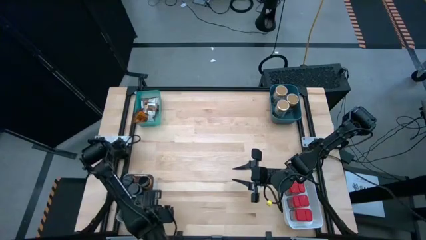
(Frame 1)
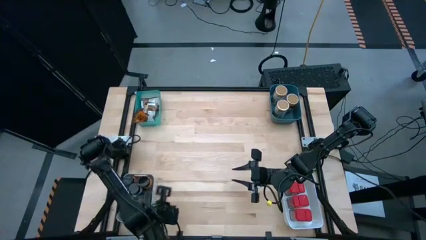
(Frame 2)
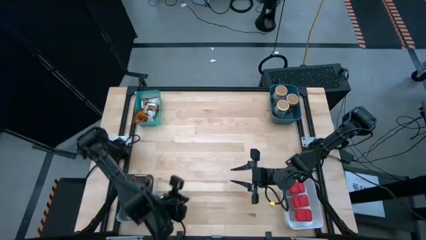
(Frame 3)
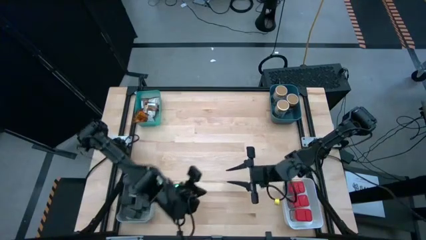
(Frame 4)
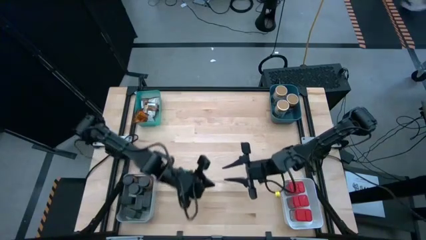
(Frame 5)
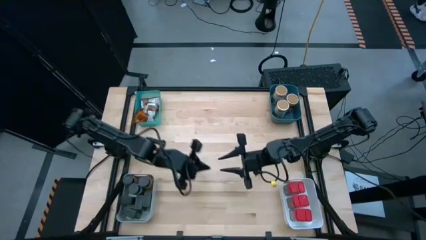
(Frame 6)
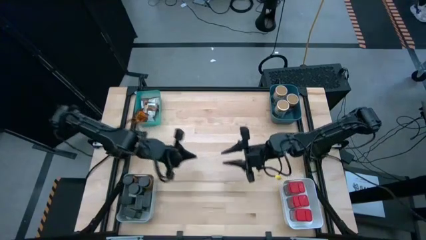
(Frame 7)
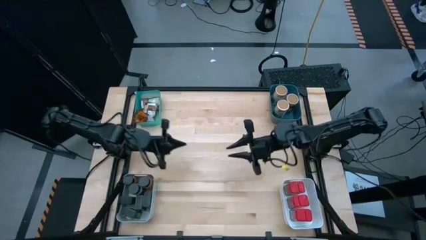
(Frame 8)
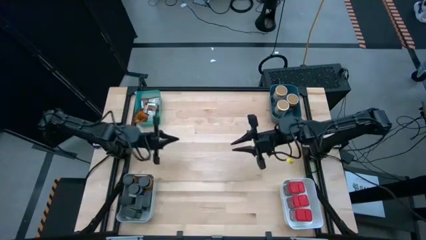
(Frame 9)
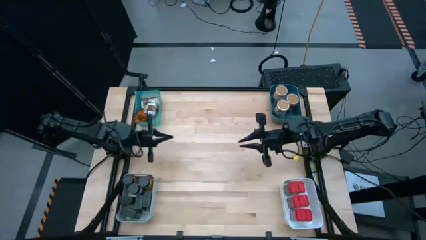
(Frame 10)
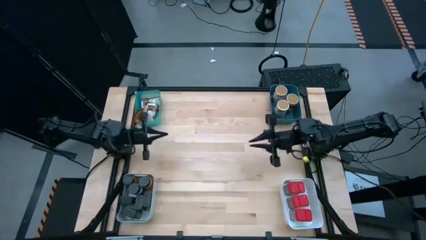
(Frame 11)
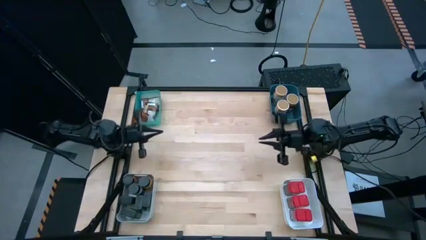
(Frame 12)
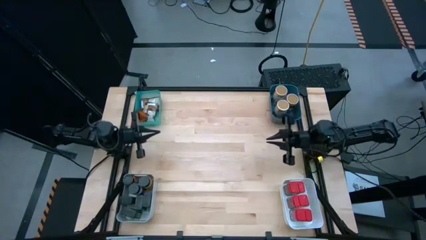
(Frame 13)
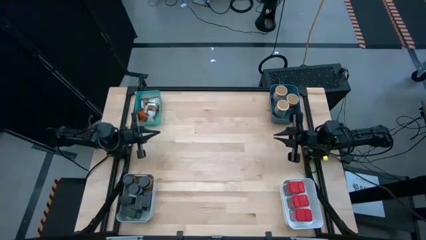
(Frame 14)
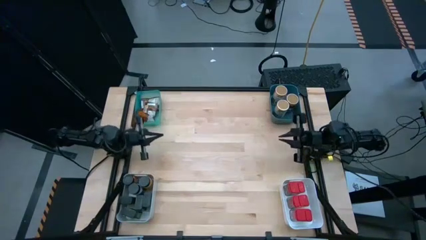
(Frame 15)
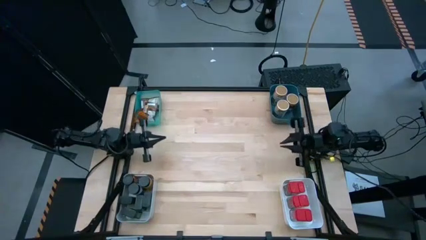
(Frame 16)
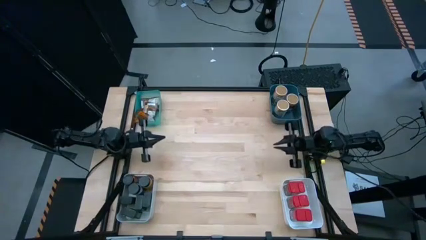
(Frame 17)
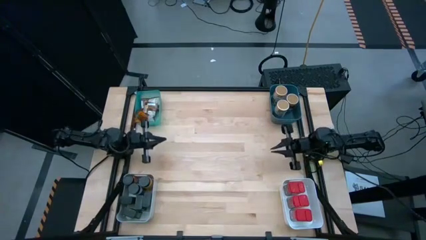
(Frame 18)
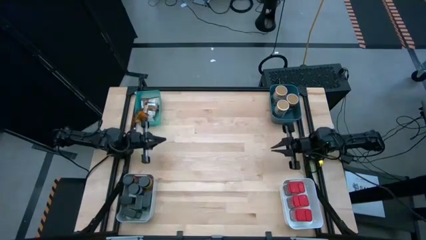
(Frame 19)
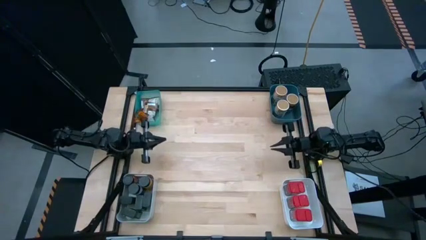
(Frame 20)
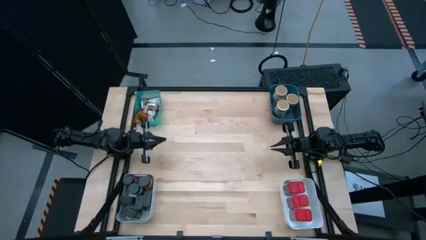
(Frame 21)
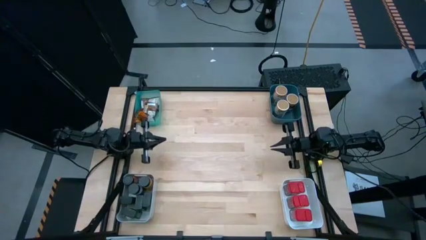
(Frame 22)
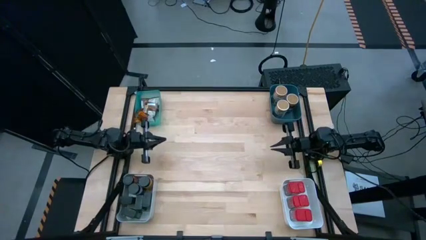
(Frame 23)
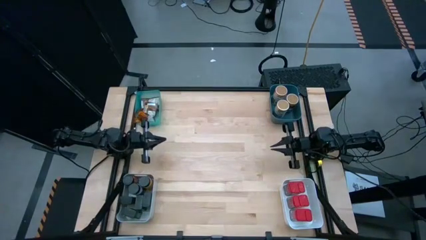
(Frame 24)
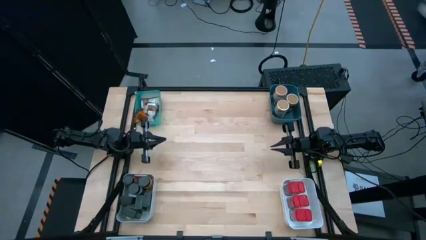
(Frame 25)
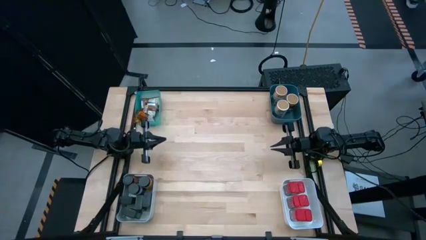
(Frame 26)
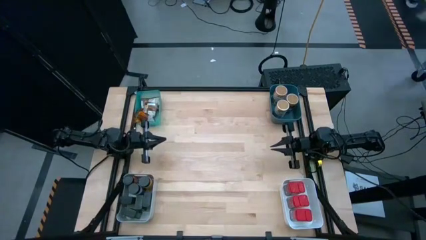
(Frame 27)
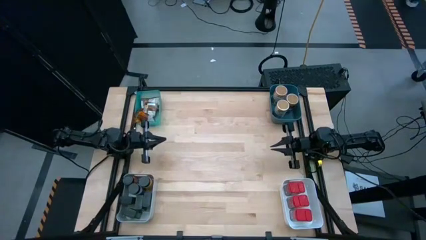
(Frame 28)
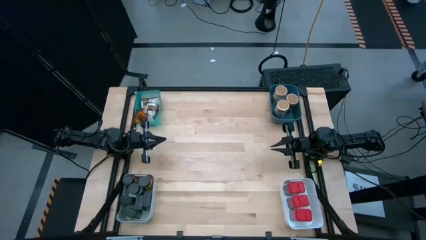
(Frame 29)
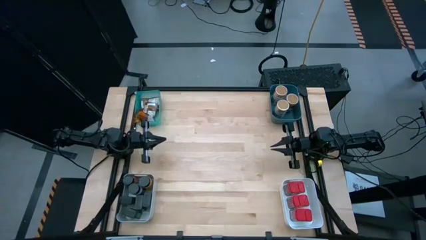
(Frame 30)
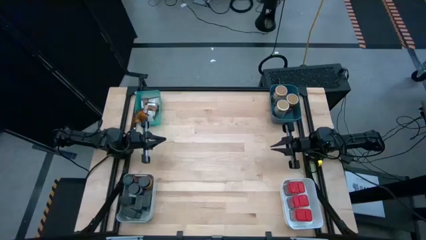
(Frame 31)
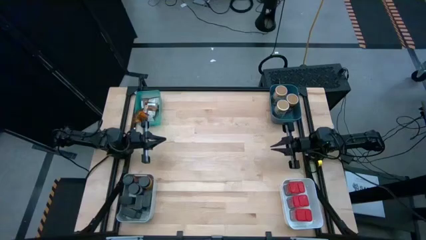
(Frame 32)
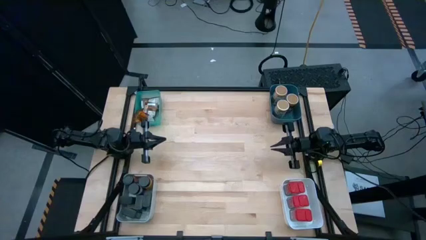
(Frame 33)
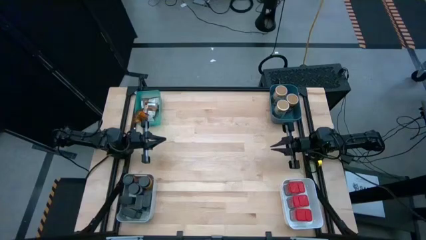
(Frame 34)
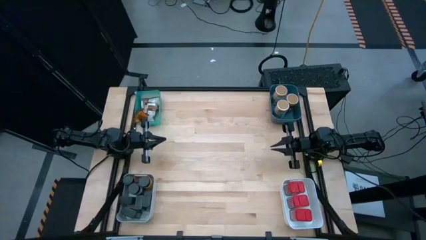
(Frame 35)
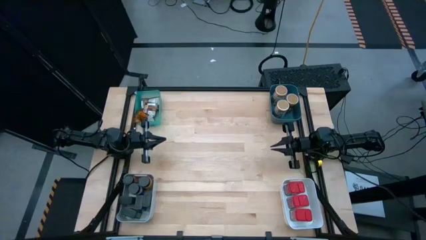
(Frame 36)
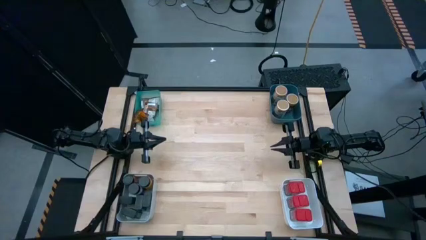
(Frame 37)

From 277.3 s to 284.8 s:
Task: Sort spices by type
Return to Home Position

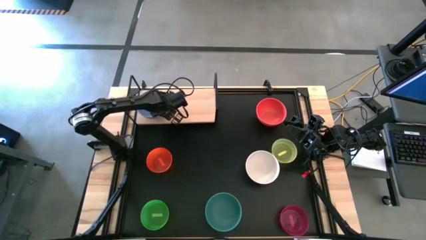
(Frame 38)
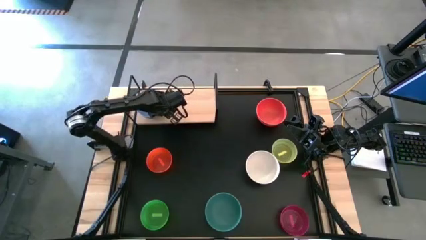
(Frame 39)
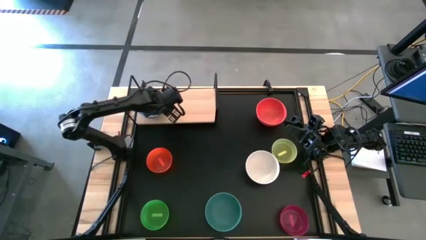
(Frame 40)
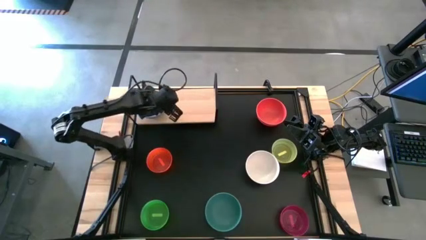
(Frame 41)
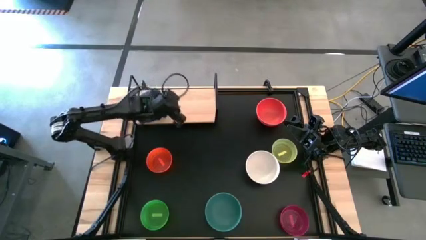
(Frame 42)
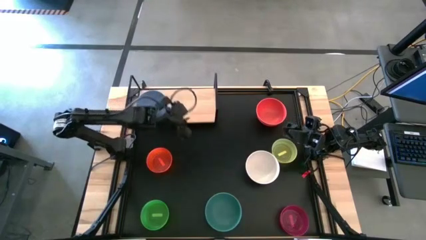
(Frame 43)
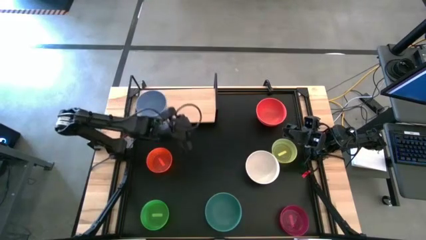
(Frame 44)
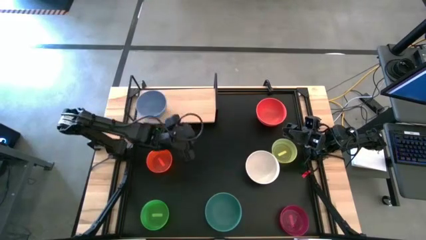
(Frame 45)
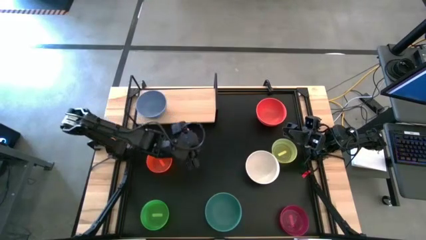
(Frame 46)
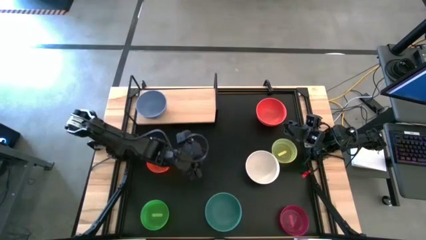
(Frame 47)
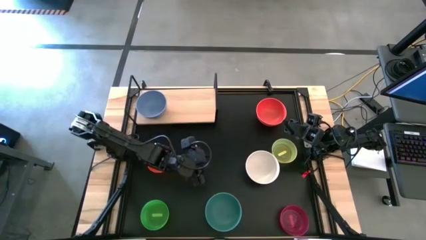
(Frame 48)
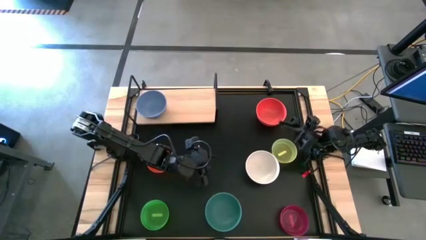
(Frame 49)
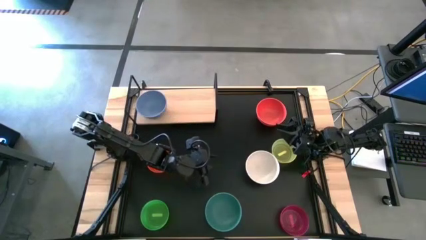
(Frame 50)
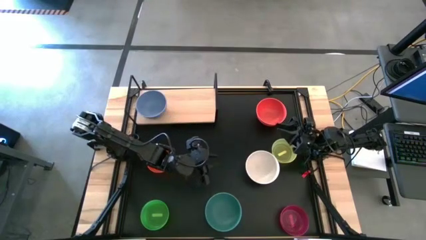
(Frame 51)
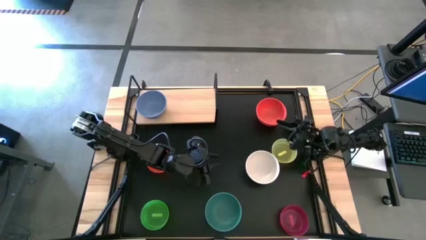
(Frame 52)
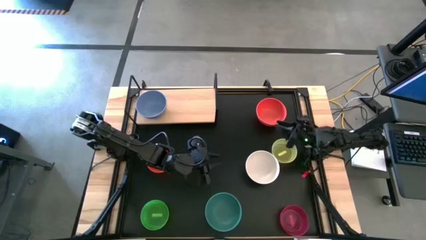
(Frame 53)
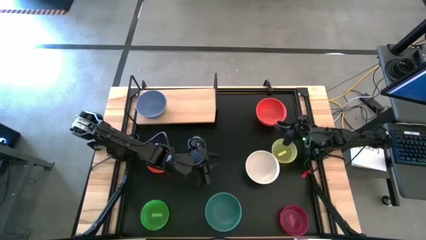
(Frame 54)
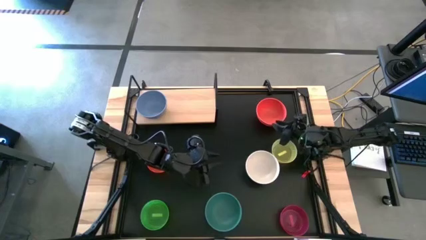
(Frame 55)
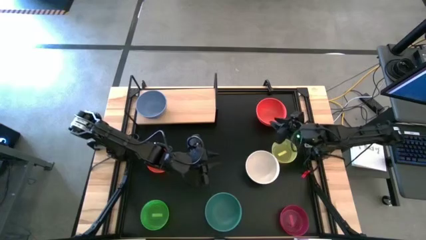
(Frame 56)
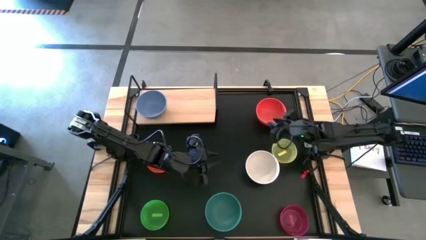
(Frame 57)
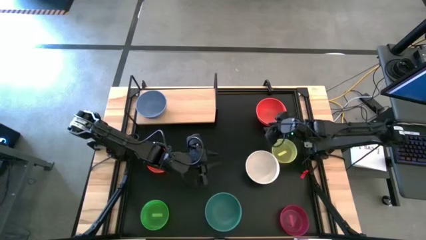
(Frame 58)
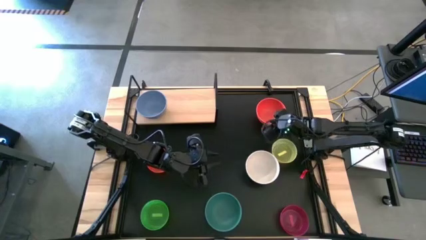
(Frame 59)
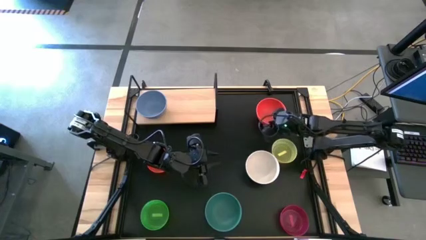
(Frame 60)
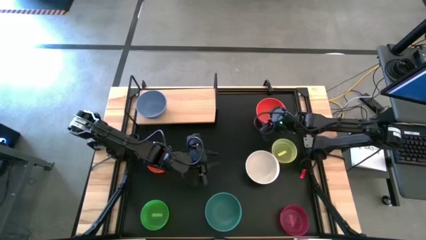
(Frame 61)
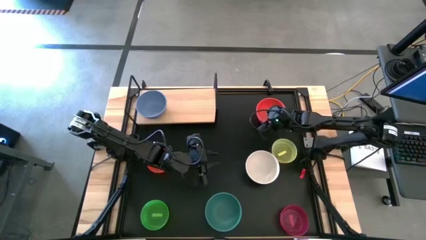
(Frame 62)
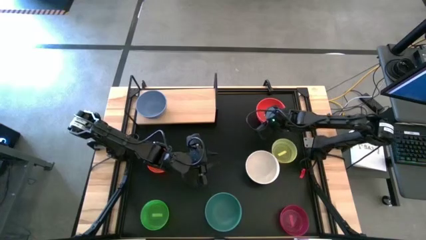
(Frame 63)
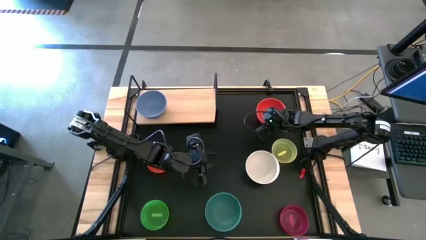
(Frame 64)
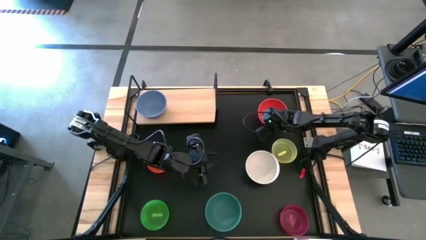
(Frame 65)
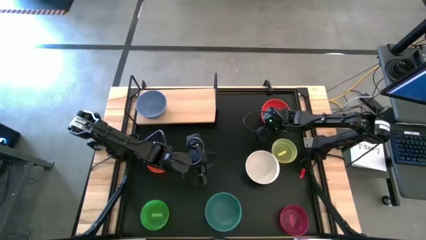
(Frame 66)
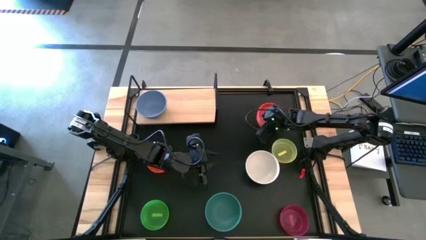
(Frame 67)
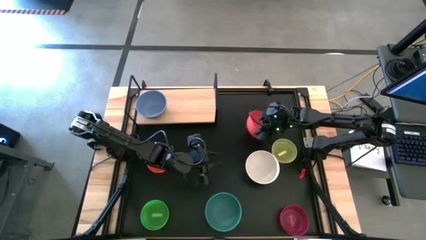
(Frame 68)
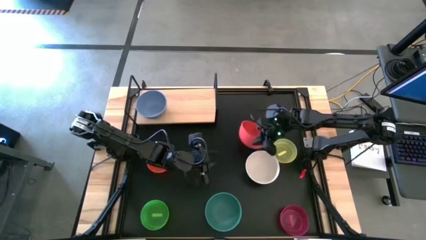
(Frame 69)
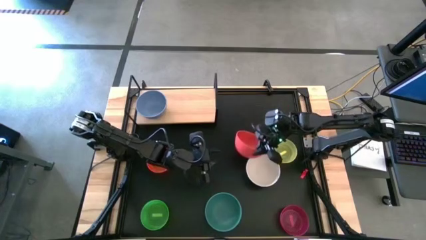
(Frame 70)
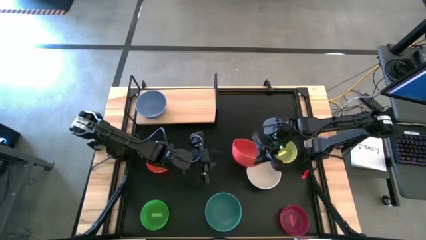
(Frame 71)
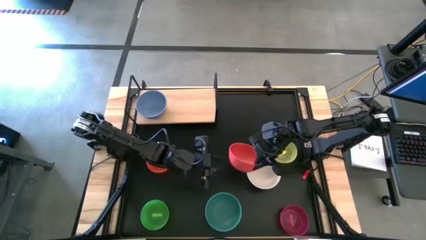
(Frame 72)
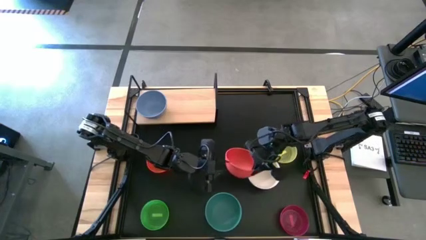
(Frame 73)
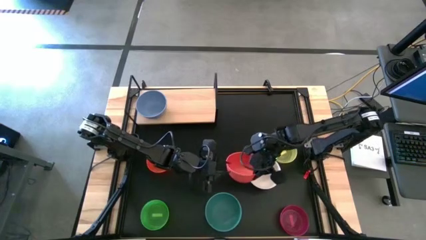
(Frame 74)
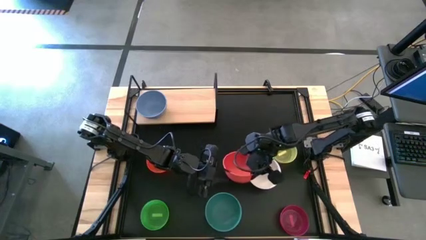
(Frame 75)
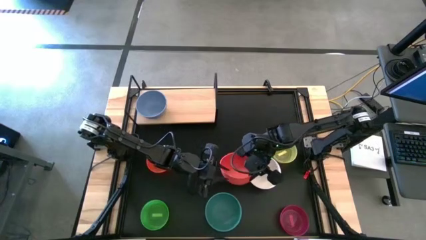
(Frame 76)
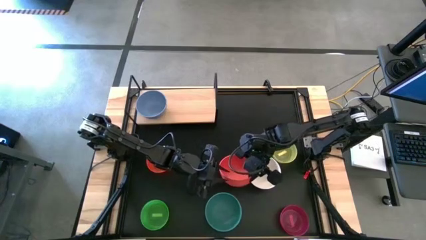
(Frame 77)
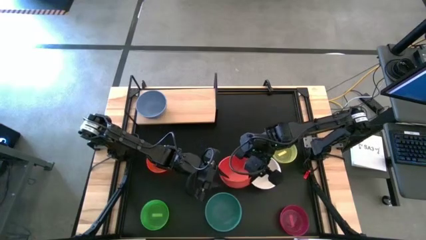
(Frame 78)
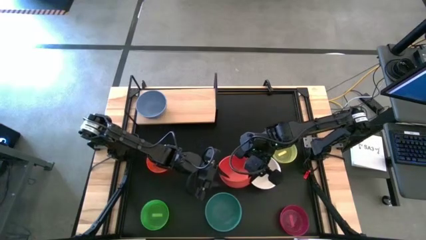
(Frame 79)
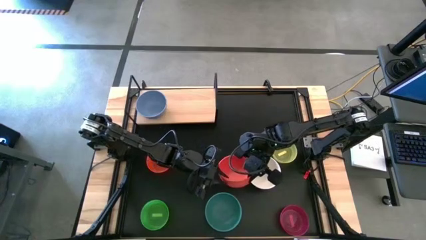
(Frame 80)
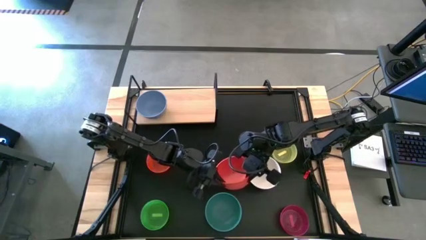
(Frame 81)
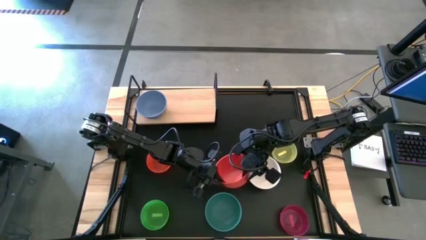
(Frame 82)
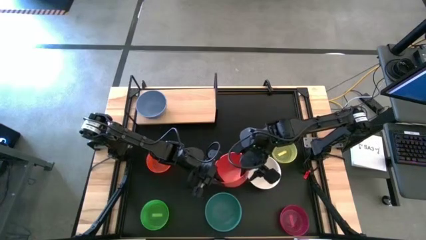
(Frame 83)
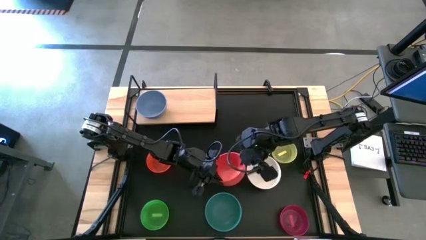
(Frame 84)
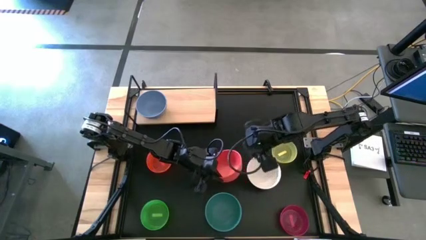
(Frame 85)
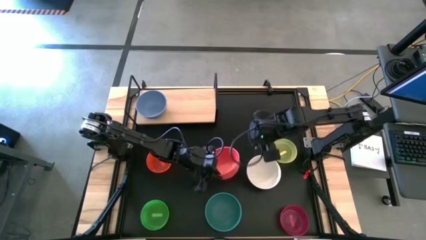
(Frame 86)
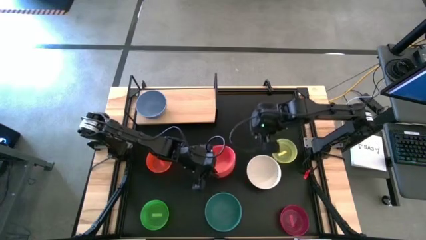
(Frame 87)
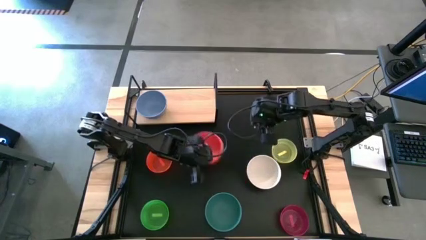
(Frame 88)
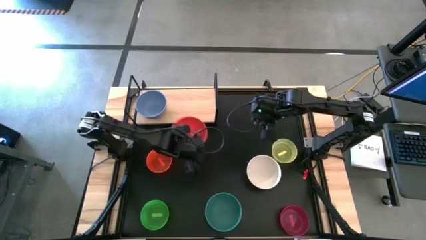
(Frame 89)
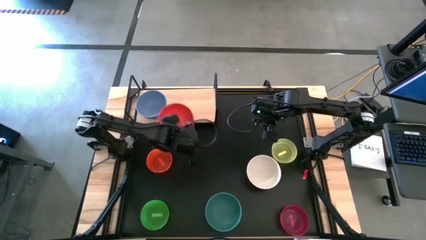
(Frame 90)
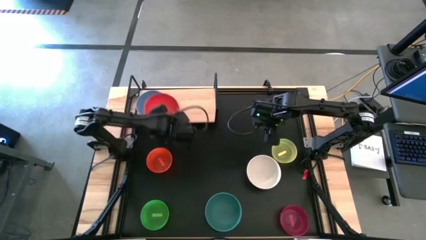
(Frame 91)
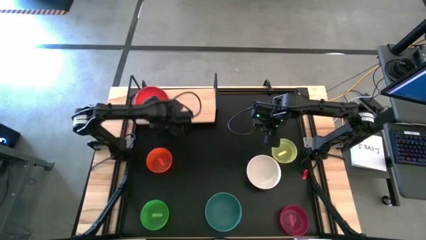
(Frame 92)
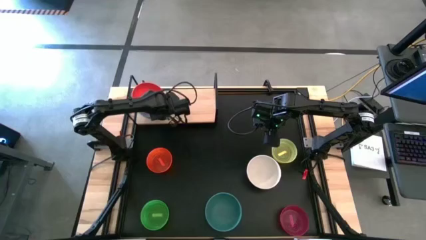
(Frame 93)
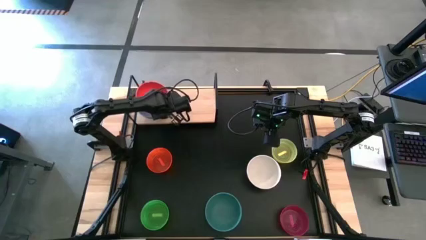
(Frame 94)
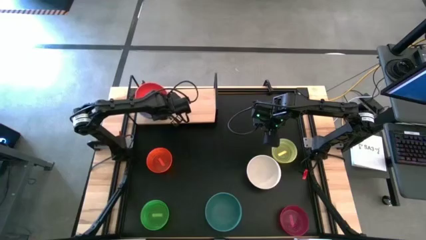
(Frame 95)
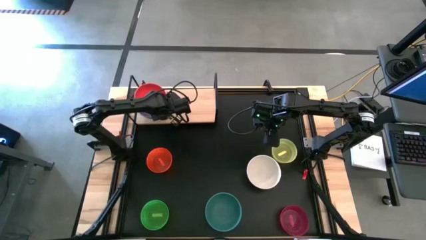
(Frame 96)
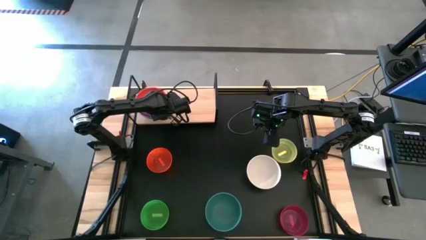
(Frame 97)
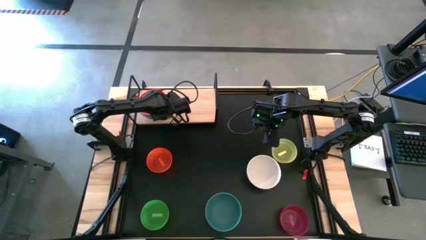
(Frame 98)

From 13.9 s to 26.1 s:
Task: Place and stack bowls onto a shelf
Stack the orange bowl on top of the blue bowl on the shelf
